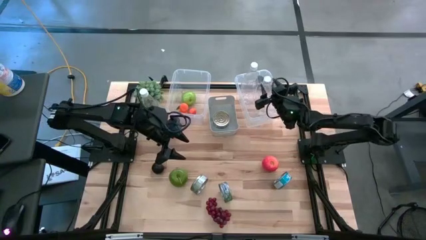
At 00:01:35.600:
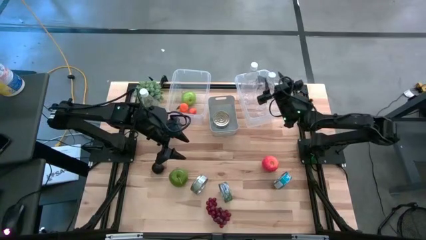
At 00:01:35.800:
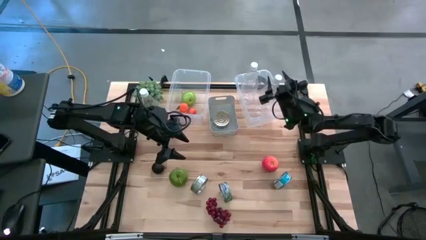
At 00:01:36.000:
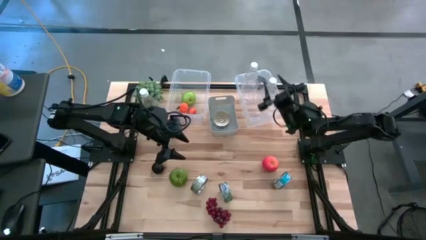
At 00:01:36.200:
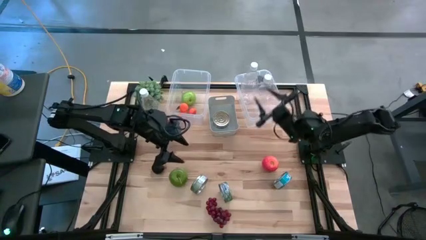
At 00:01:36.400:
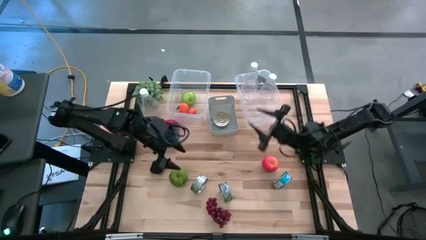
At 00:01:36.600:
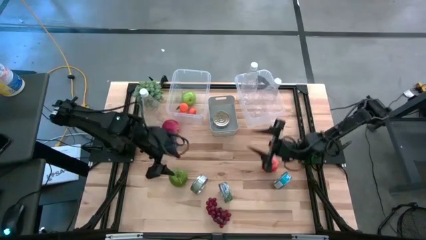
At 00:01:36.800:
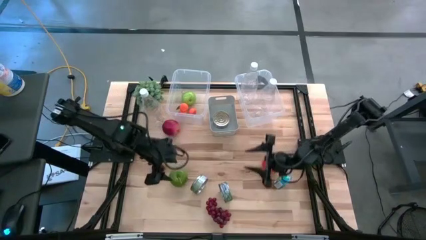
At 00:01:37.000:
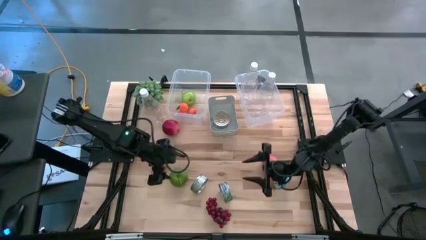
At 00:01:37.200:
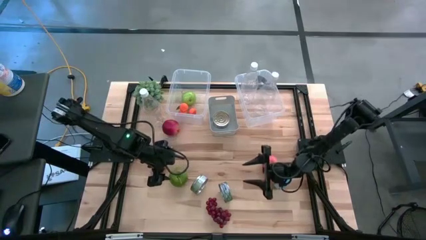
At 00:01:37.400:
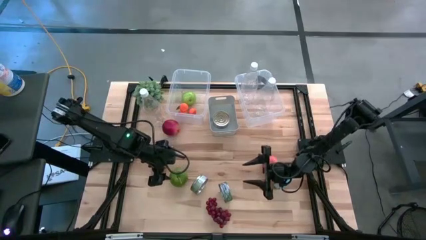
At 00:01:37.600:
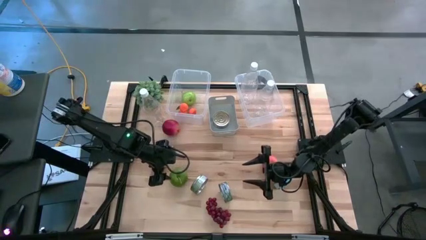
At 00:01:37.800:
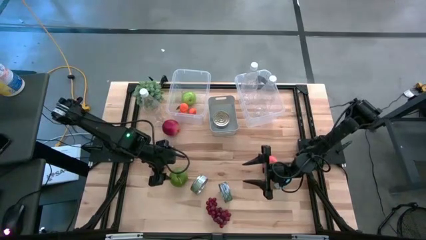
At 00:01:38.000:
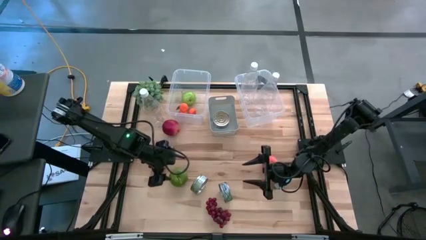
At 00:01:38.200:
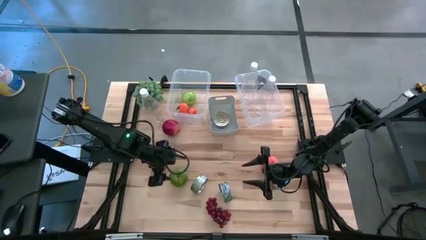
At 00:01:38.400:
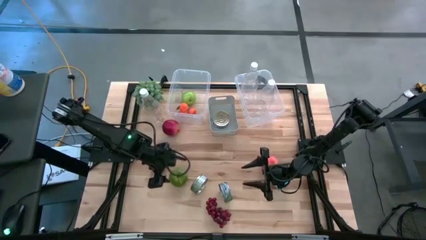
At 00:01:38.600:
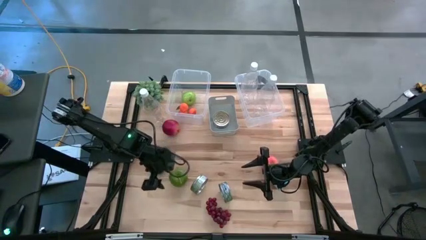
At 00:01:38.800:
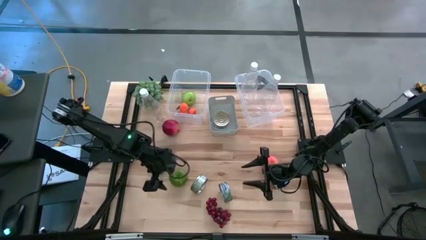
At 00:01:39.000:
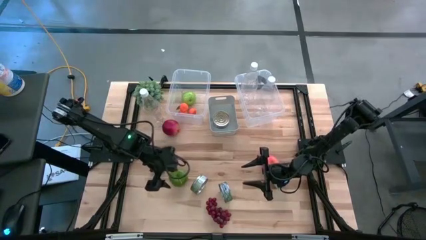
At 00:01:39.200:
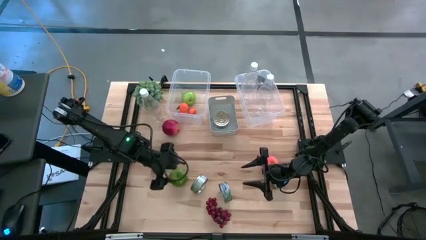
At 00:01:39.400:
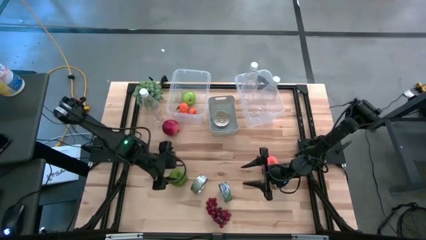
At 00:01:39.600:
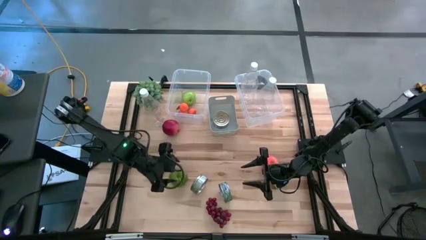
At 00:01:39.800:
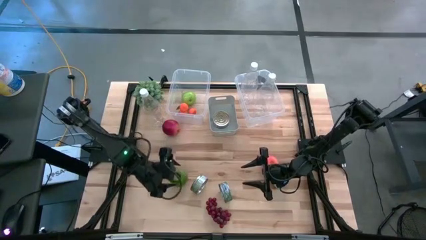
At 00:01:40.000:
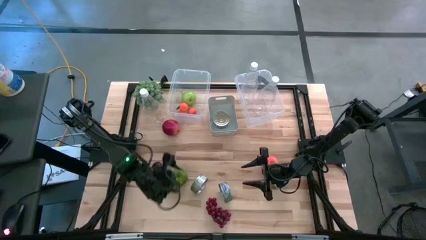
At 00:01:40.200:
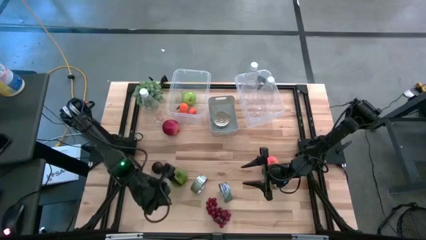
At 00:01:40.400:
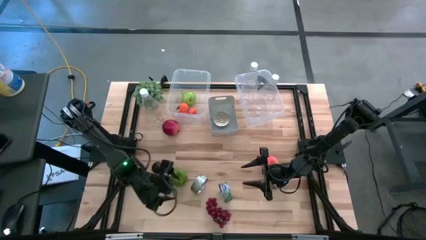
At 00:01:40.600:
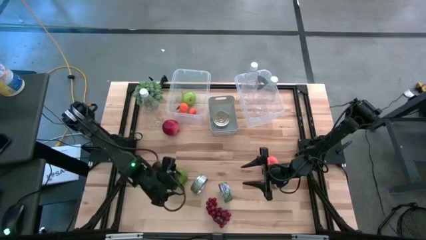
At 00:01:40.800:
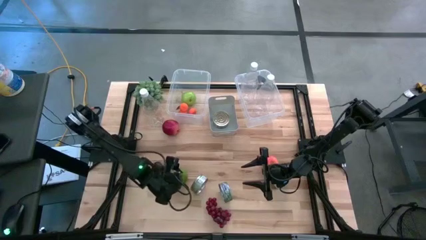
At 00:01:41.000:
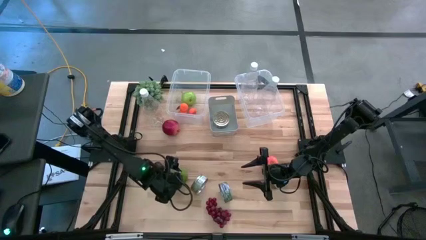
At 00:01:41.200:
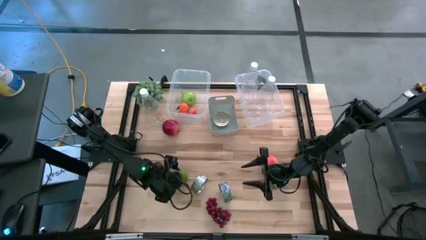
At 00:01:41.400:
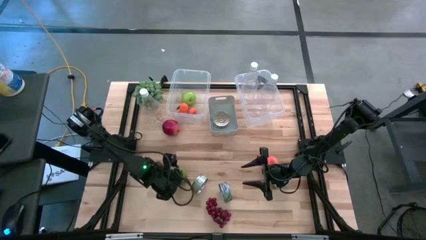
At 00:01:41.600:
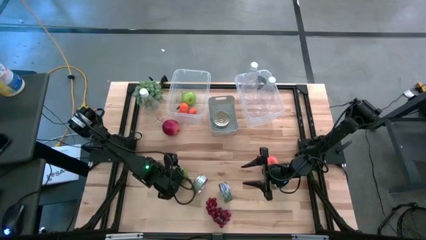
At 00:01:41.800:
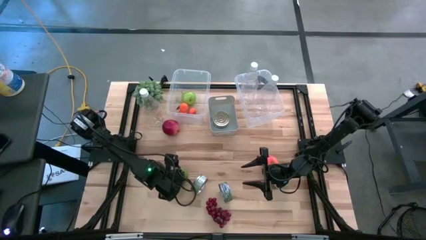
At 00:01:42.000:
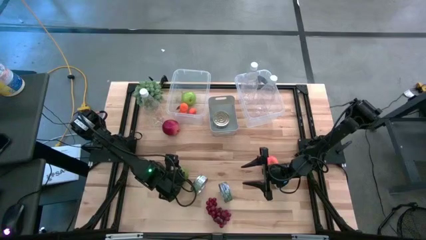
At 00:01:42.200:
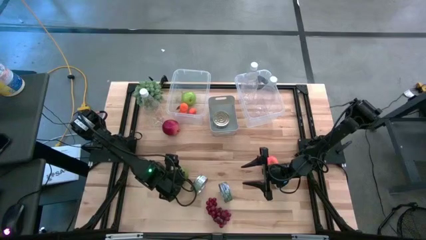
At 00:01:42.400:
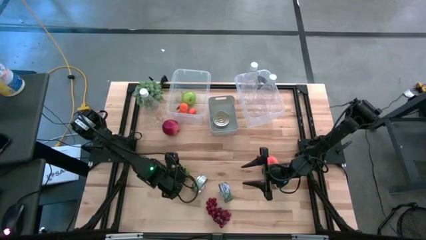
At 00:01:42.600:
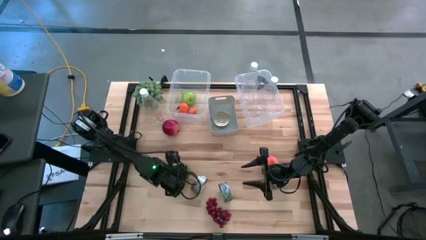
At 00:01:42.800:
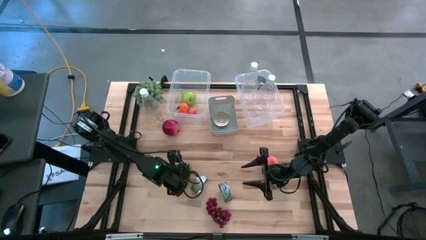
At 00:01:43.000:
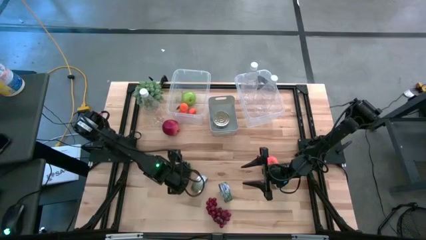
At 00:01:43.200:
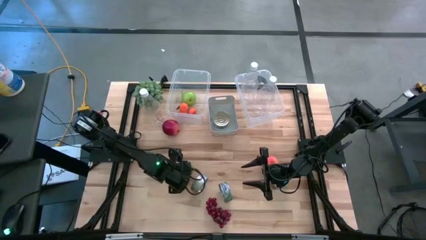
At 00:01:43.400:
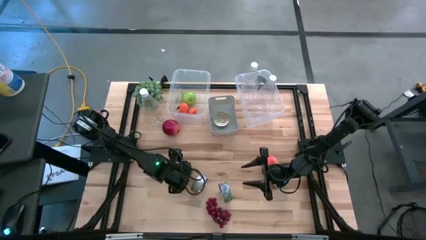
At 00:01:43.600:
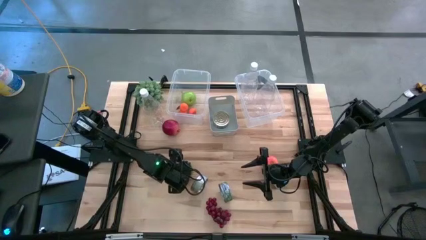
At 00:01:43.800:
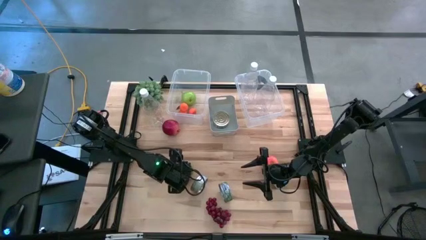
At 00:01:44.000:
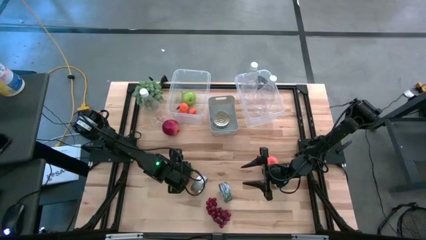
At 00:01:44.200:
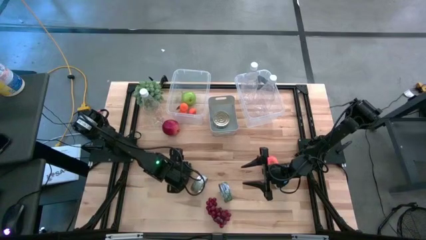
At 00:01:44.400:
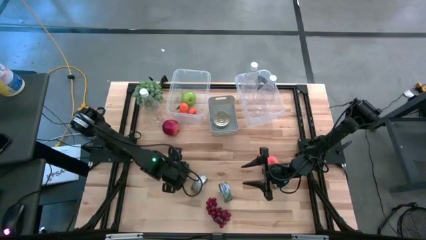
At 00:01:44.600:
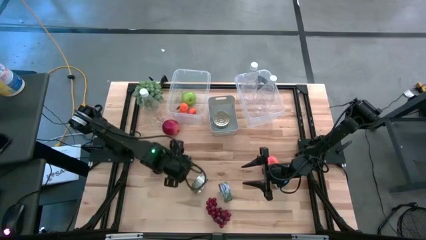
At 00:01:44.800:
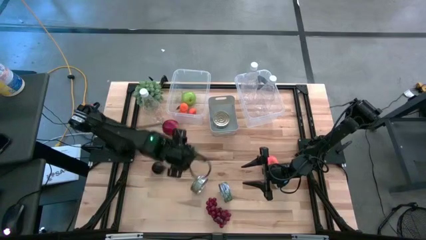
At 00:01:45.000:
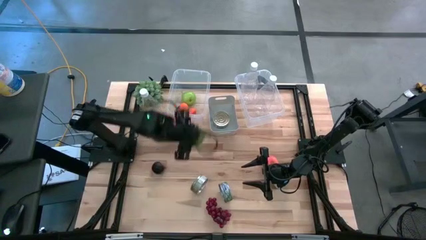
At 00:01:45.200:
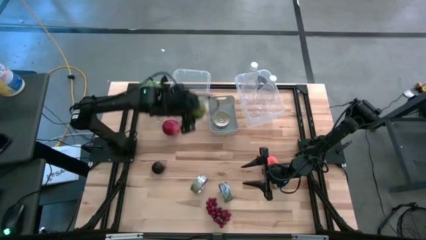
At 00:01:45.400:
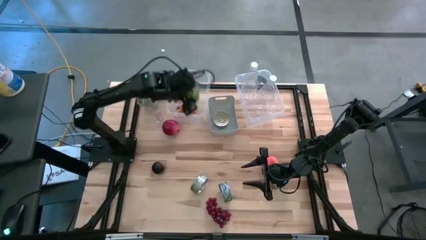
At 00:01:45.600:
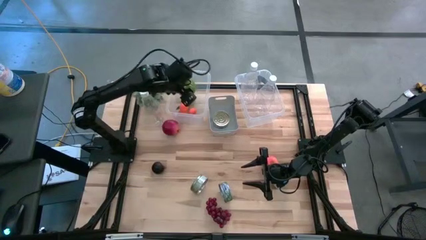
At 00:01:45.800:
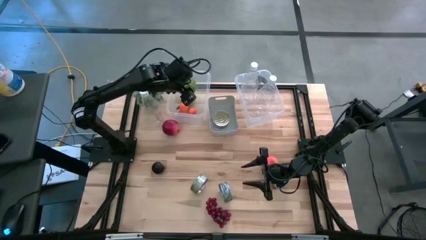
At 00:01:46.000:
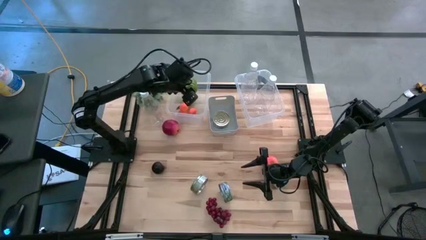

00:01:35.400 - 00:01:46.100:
Task: Pick & Place Food Item
Put the green apple into the left transparent bin
